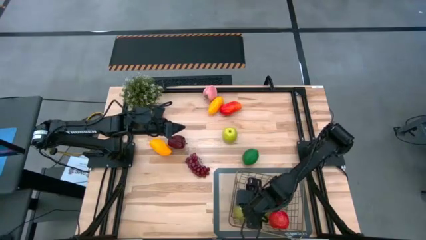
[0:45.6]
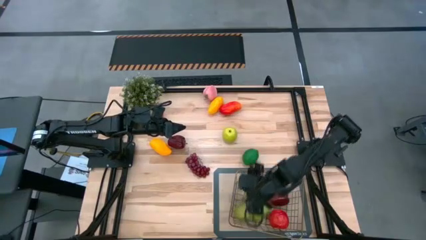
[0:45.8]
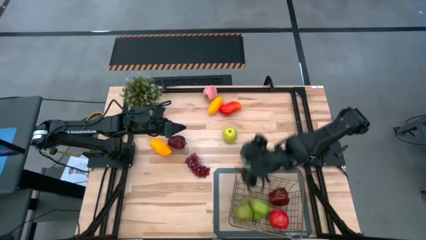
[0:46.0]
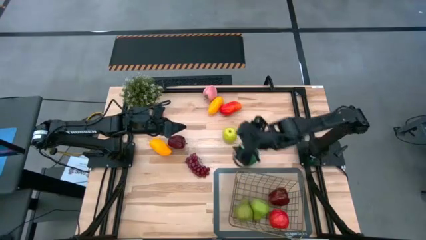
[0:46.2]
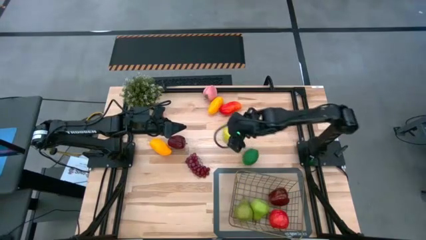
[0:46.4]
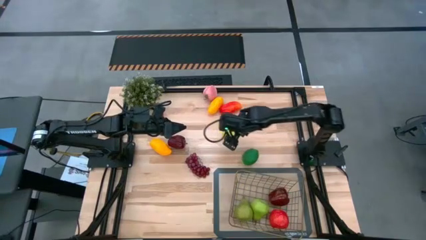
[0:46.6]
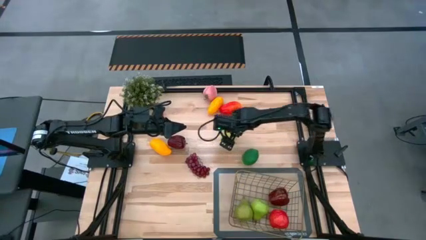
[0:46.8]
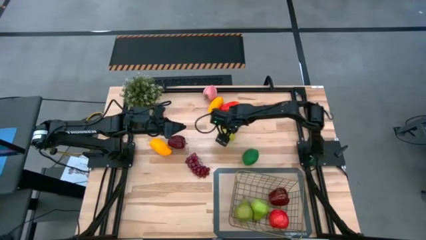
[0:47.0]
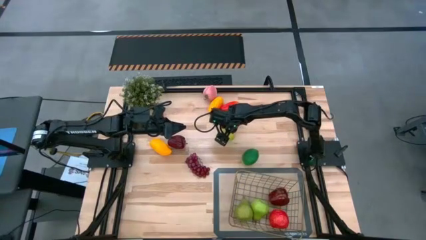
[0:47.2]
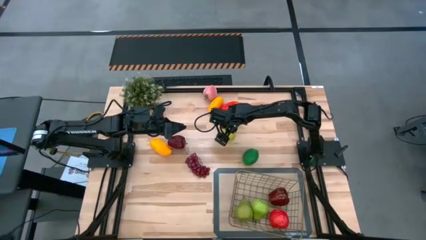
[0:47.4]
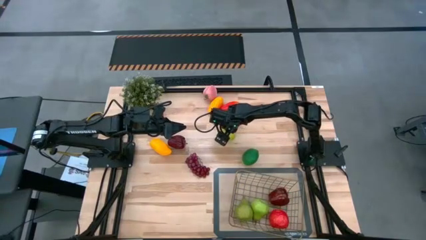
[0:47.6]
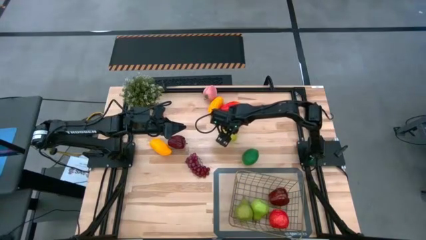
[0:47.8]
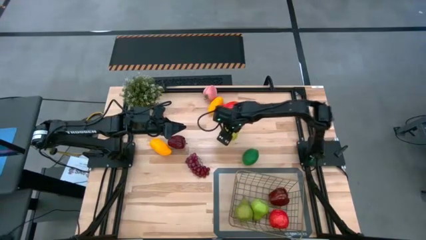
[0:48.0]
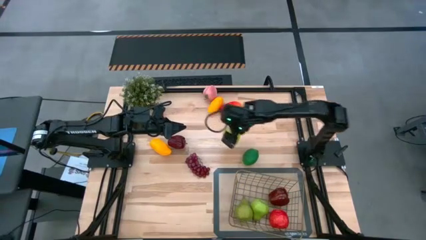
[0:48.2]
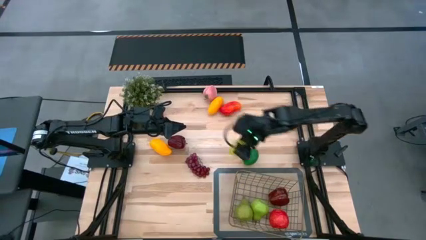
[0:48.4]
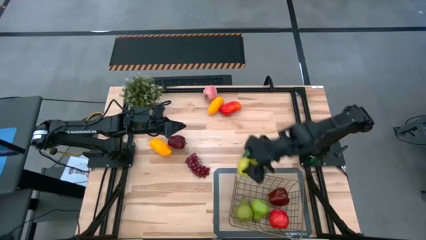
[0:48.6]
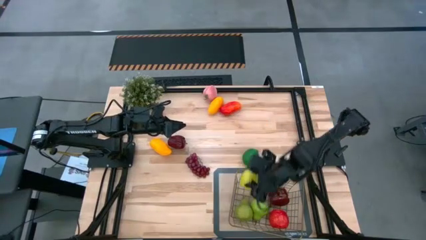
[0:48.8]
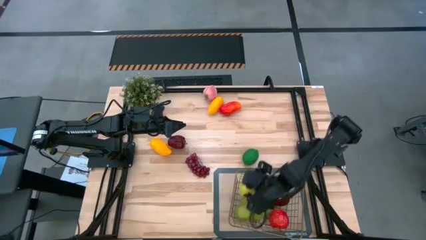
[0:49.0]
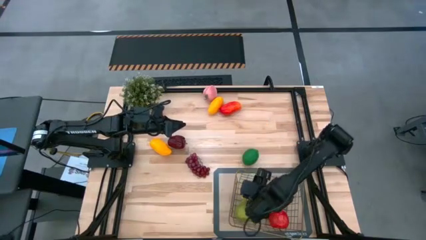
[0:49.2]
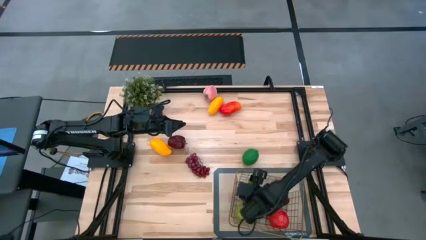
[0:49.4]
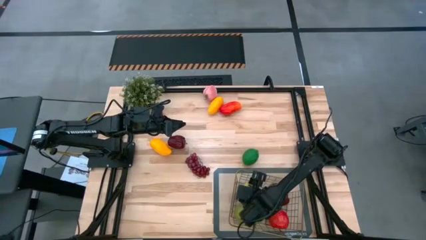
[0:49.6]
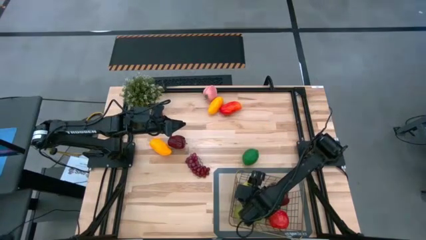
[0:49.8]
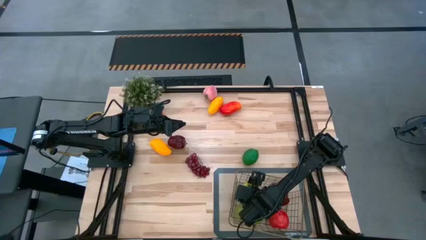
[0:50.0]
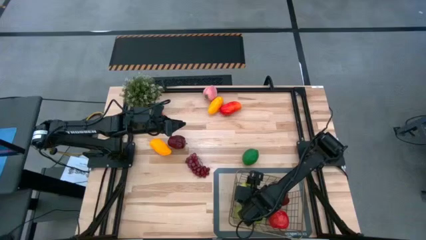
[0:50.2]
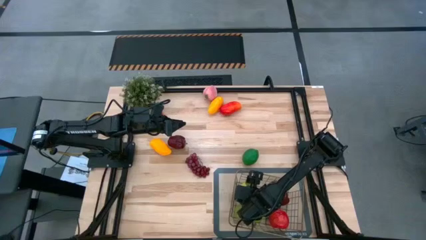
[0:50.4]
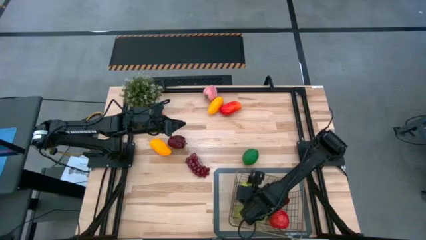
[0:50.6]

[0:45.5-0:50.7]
Task: Build produce basket
Put the green apple into the wire basket

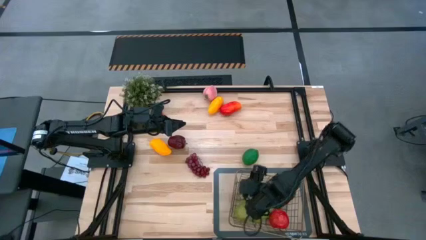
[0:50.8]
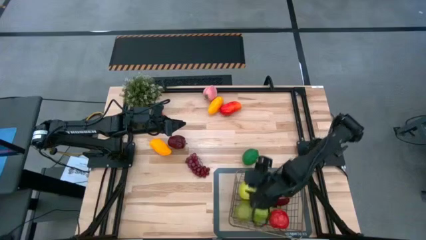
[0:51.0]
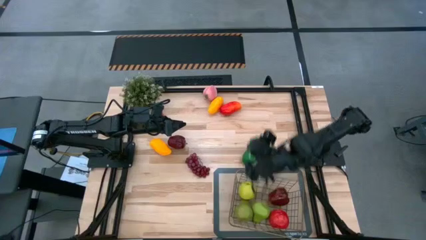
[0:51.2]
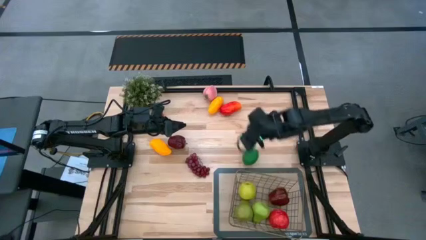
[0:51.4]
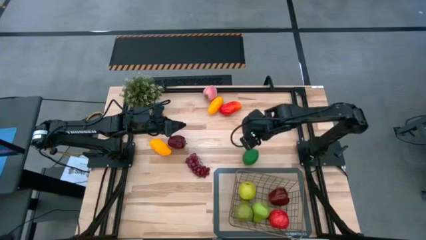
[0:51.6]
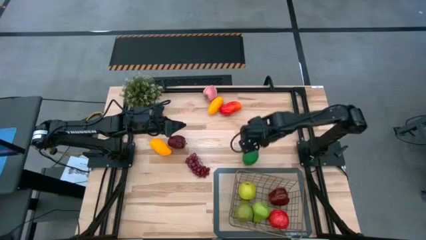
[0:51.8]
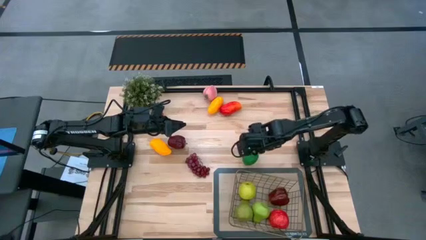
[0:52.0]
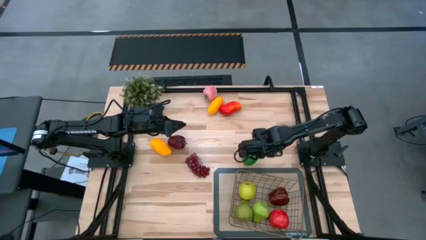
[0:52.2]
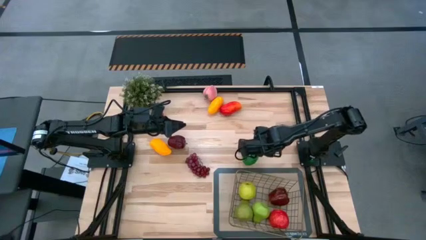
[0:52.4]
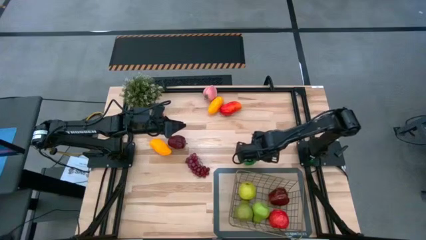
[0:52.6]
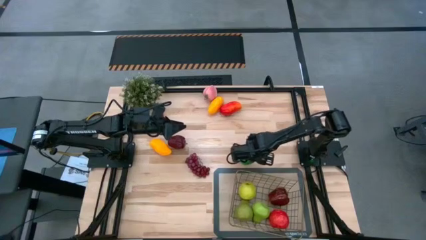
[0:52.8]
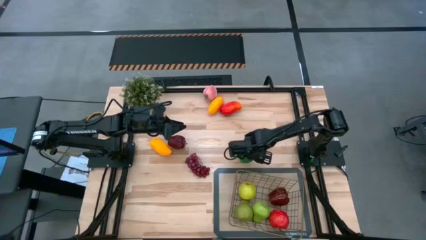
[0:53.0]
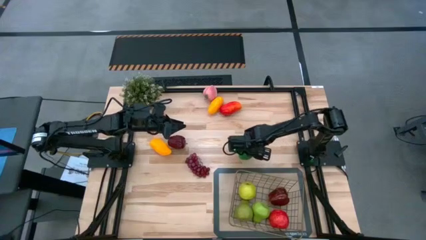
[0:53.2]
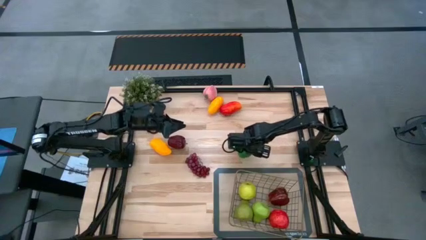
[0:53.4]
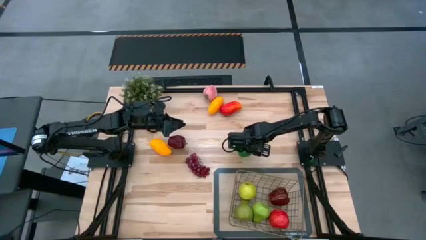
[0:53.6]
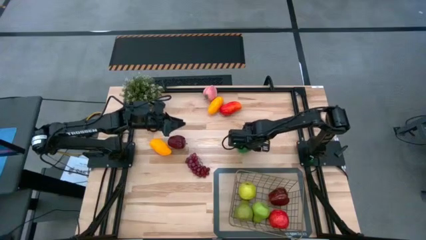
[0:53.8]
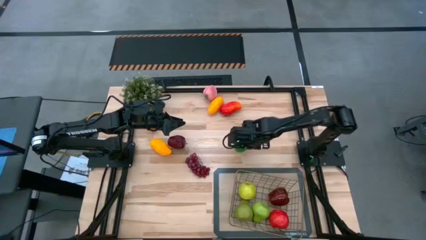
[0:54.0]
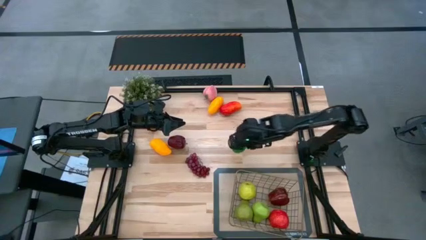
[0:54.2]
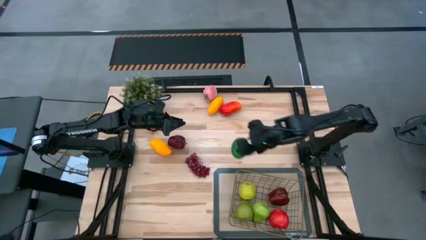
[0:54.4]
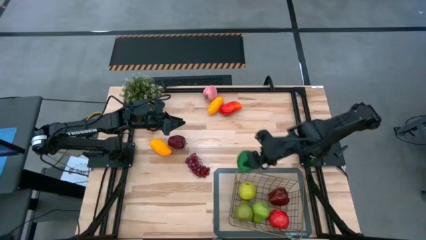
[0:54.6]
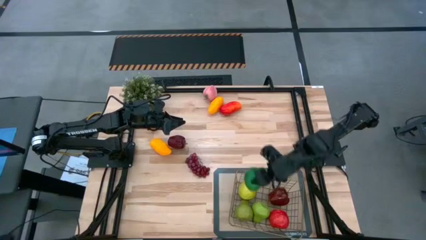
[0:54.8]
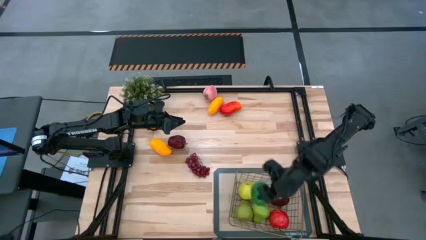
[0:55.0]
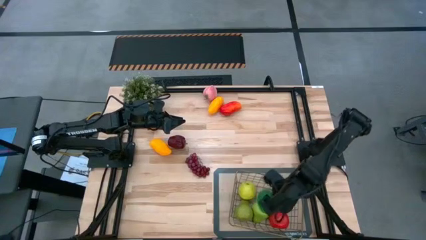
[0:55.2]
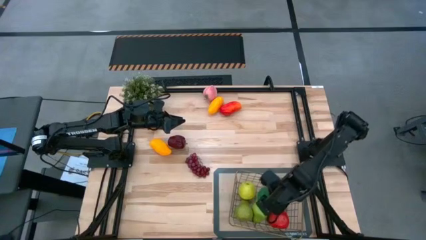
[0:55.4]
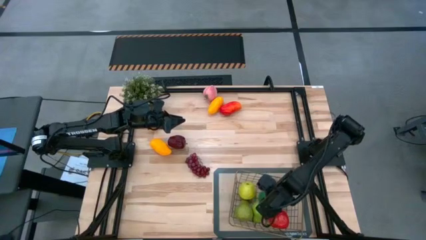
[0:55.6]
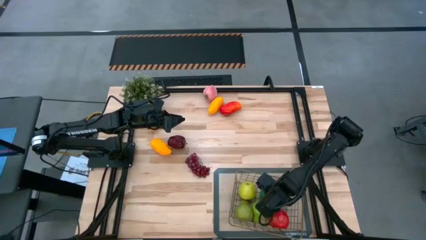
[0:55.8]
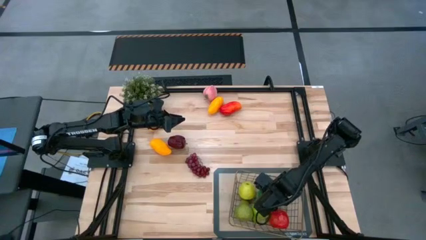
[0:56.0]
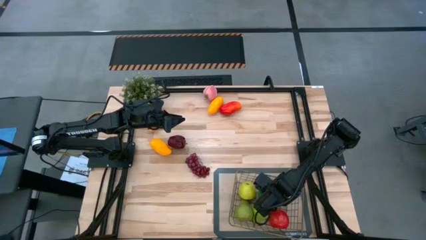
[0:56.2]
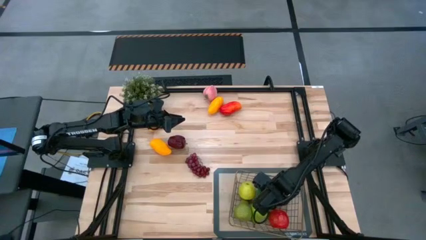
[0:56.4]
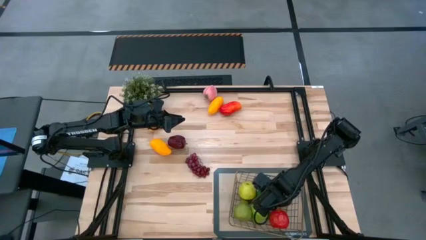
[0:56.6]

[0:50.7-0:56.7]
Put the green lime into the wire basket
